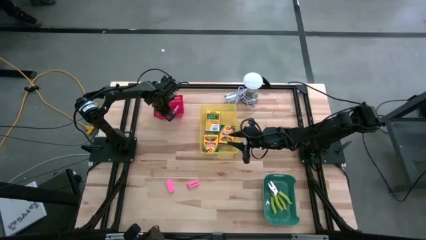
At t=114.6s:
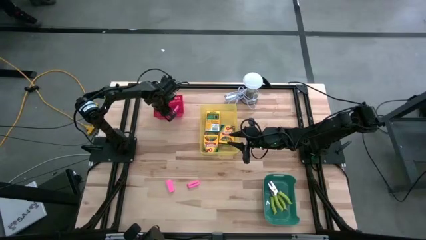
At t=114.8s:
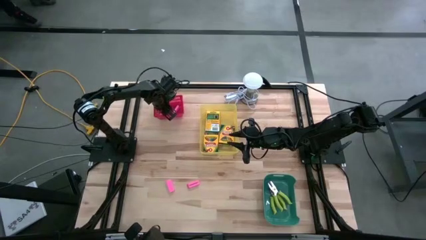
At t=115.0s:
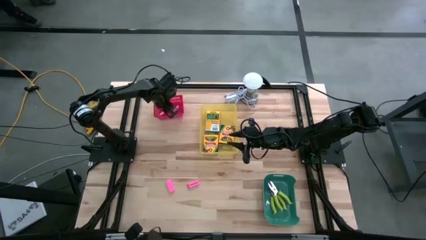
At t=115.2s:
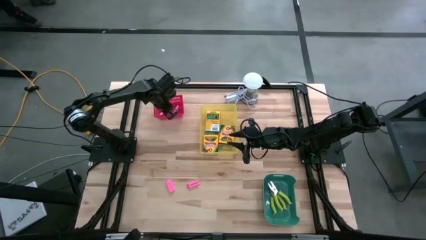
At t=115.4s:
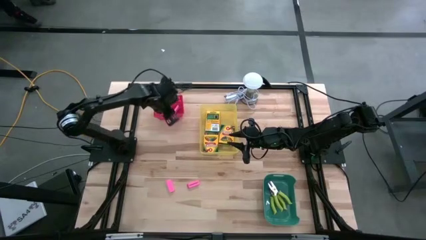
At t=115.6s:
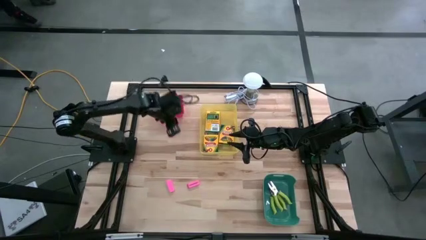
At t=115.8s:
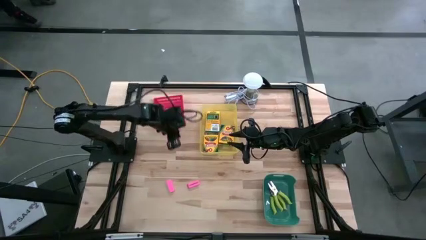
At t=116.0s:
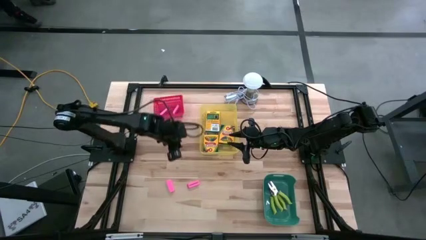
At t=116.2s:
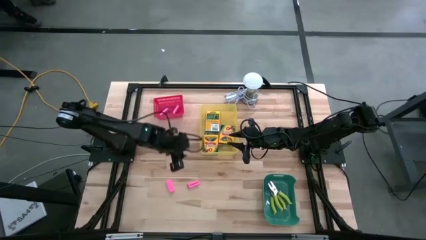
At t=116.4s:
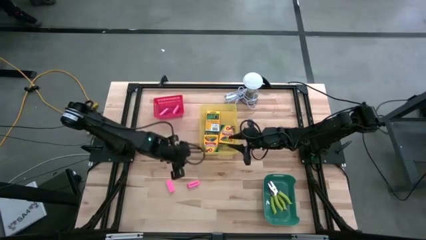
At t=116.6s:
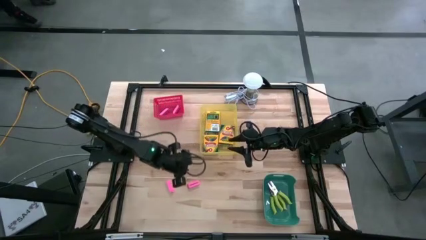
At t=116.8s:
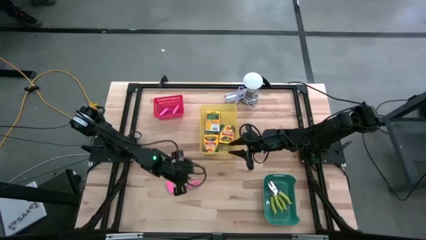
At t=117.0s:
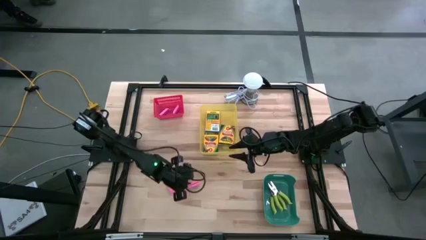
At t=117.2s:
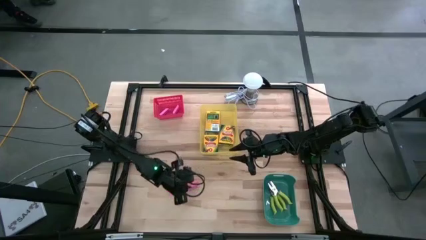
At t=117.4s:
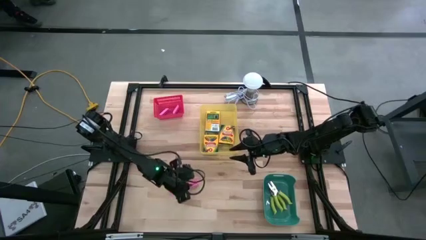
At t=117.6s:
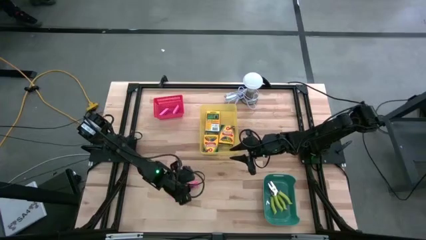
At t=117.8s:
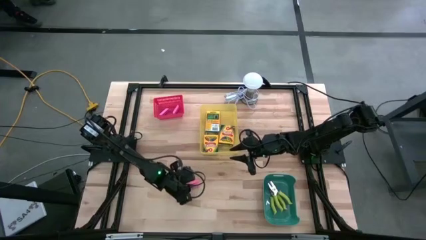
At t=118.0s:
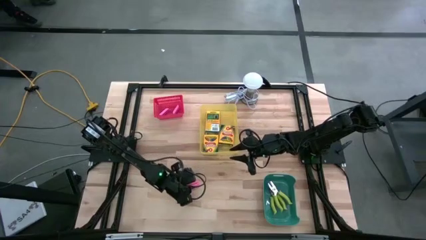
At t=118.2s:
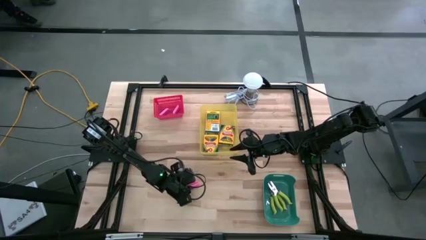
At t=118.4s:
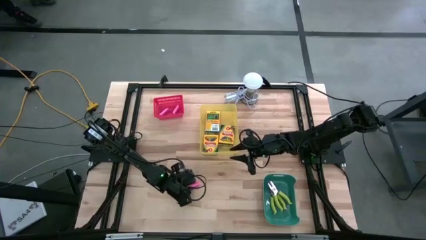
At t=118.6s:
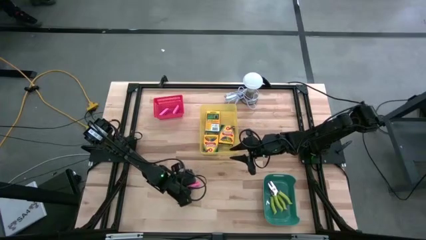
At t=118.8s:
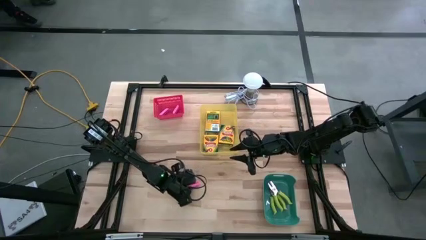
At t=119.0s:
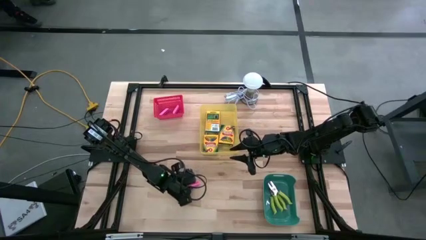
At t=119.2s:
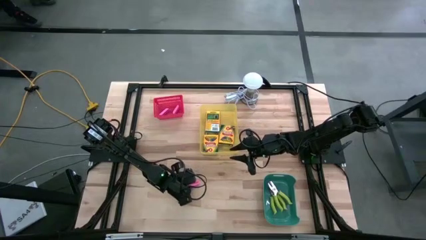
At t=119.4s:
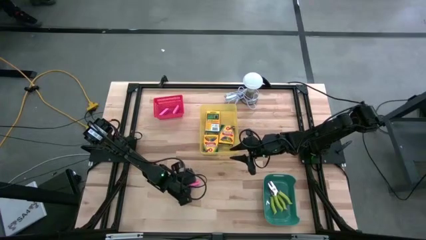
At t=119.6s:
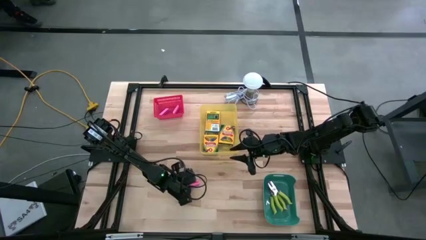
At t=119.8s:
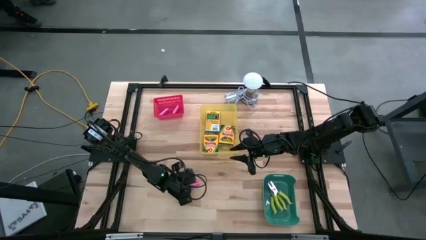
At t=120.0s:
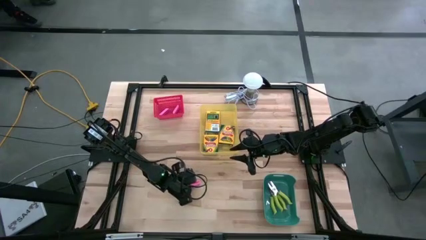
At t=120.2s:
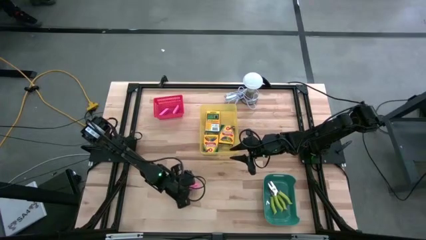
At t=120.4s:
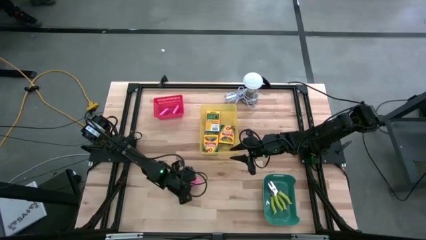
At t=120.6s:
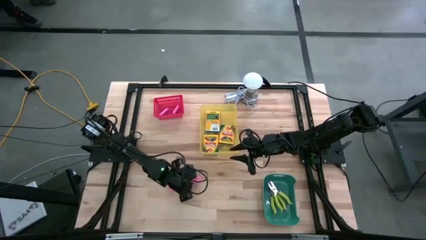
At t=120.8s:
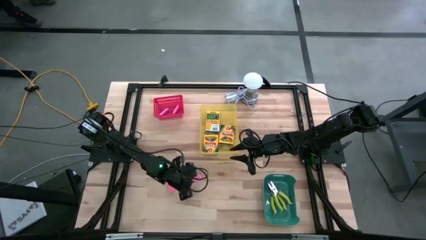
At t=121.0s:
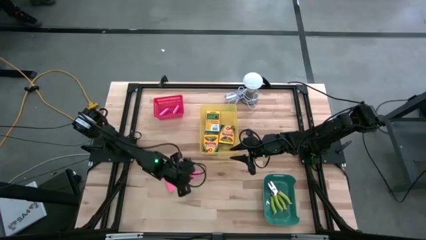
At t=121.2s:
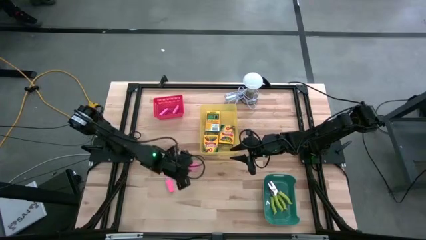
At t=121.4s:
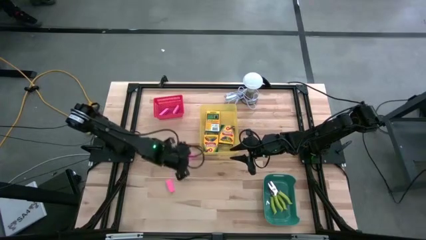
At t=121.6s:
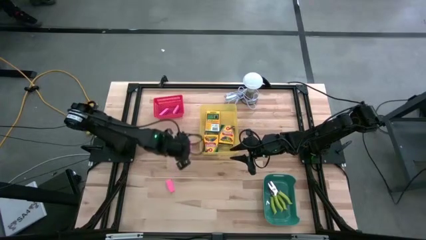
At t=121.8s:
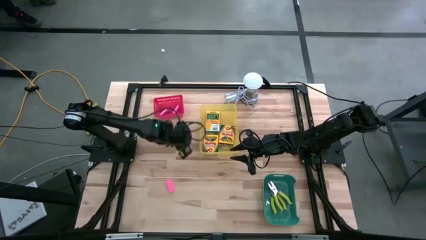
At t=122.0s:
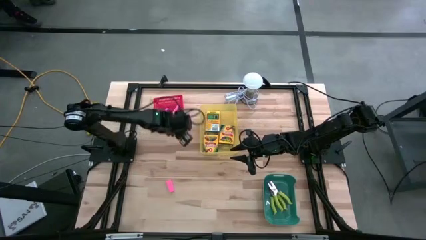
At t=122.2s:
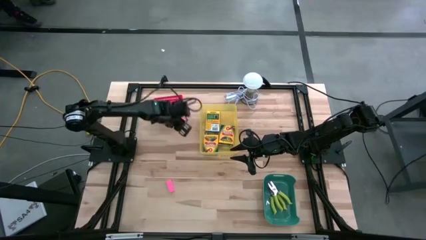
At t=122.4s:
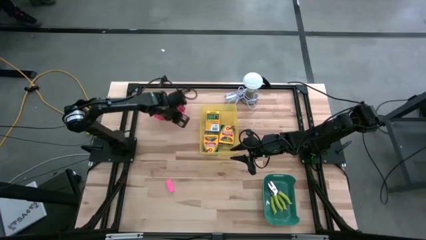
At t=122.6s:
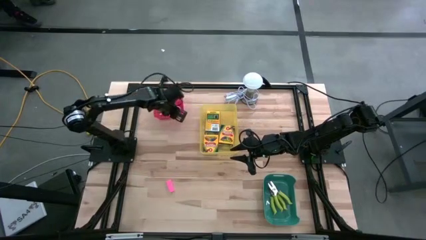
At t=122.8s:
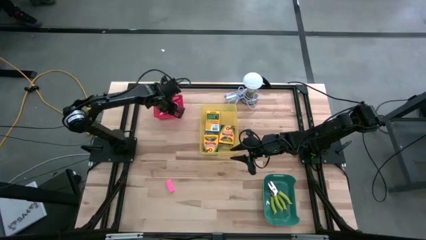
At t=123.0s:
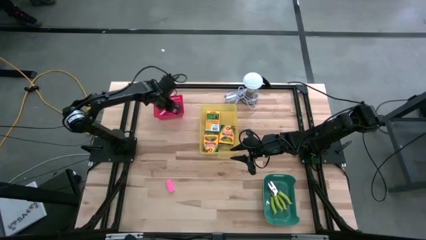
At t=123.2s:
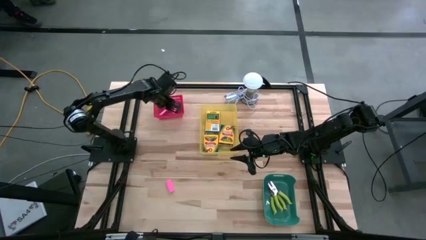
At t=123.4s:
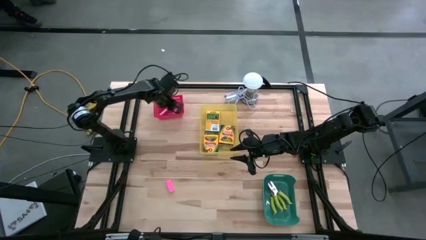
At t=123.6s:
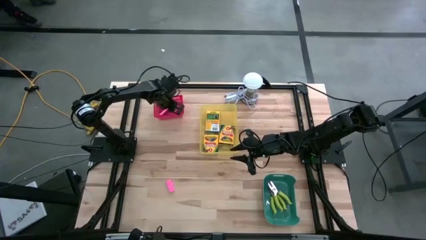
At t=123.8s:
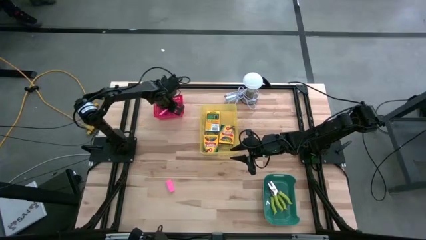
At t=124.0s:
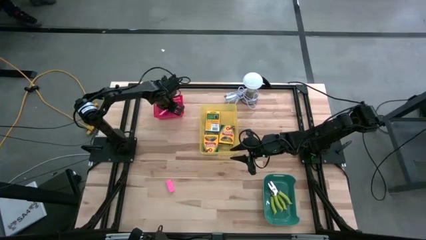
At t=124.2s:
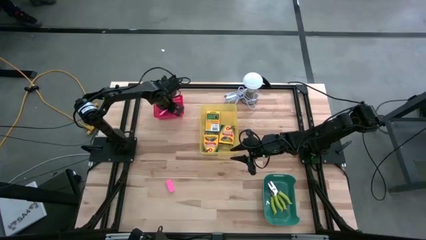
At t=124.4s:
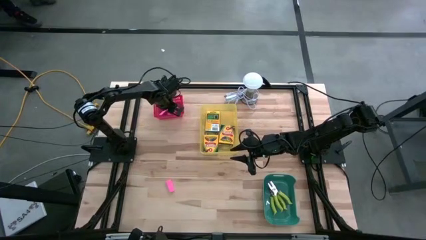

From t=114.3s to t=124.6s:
Task: Pick & Place School Supplies
Put the pink eraser into the red bin

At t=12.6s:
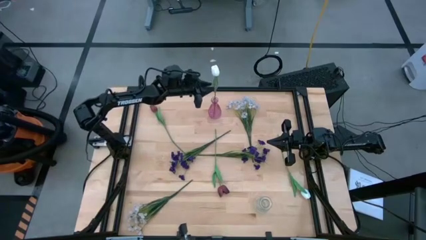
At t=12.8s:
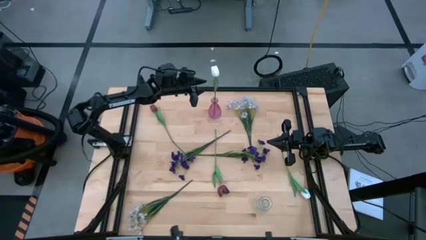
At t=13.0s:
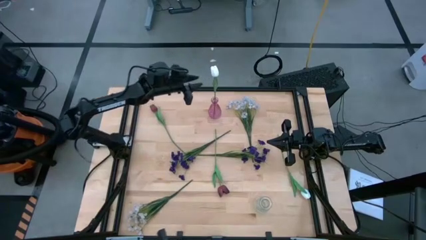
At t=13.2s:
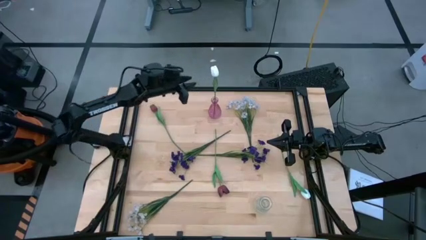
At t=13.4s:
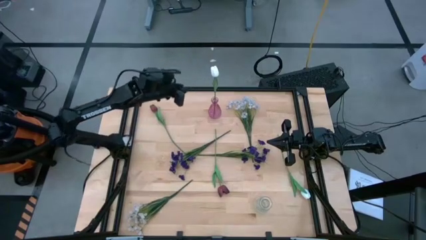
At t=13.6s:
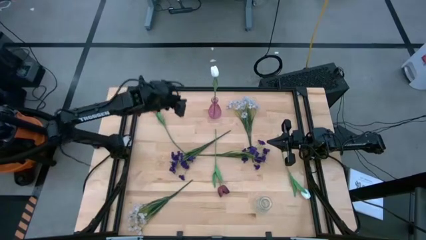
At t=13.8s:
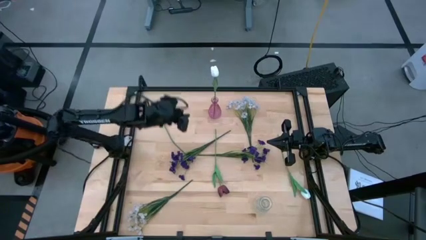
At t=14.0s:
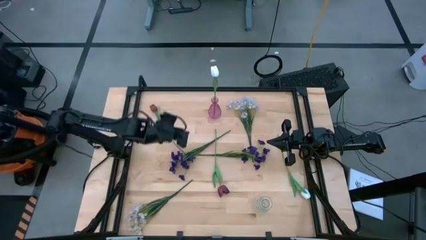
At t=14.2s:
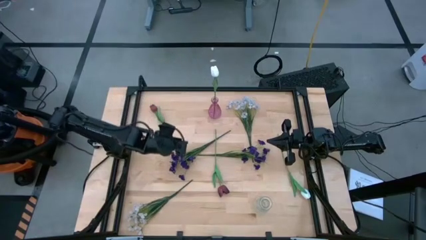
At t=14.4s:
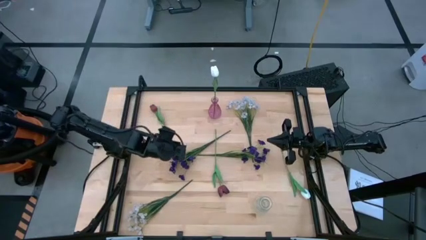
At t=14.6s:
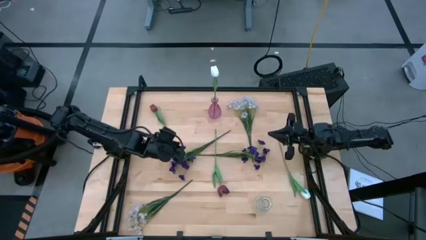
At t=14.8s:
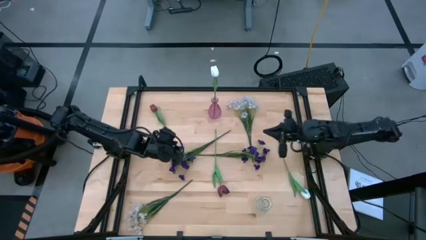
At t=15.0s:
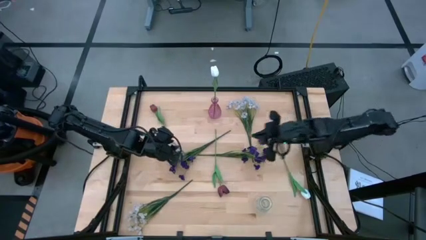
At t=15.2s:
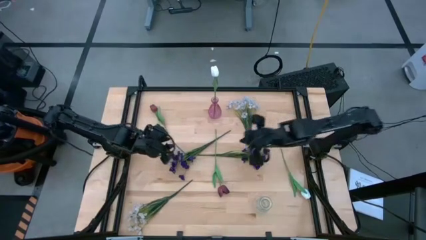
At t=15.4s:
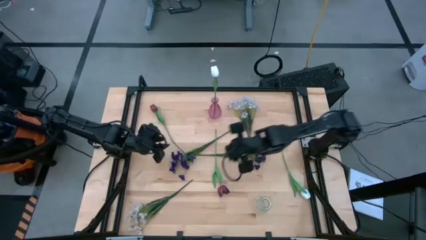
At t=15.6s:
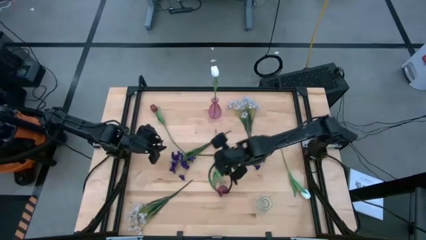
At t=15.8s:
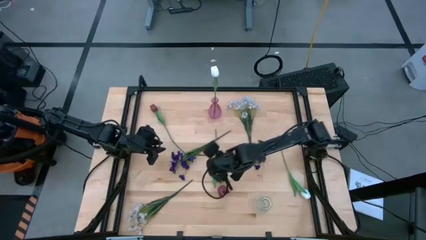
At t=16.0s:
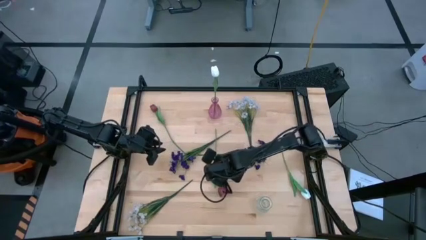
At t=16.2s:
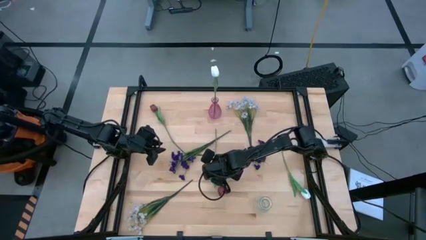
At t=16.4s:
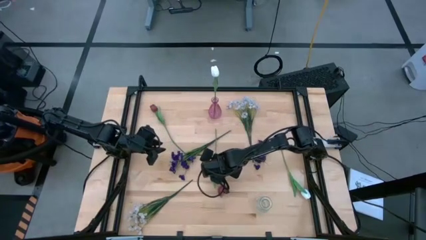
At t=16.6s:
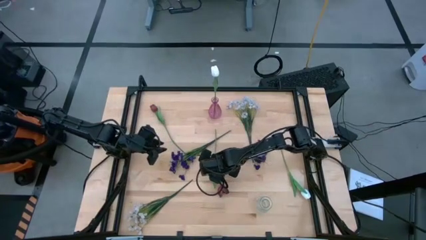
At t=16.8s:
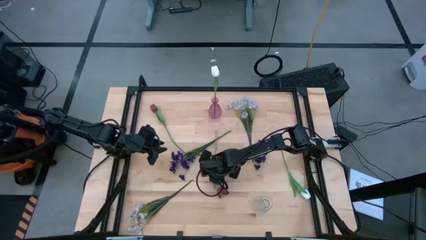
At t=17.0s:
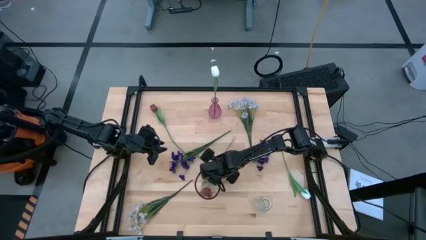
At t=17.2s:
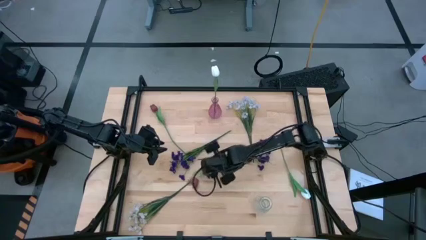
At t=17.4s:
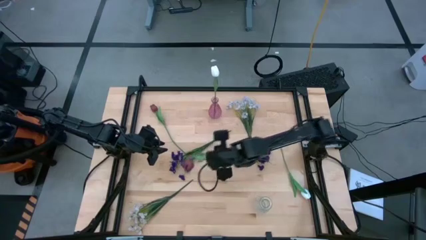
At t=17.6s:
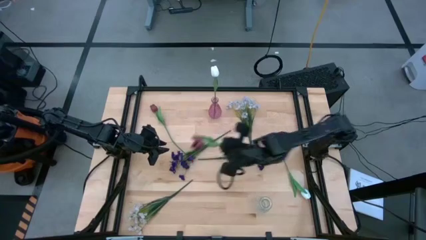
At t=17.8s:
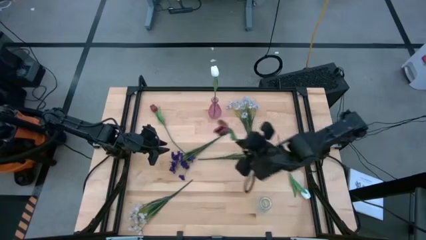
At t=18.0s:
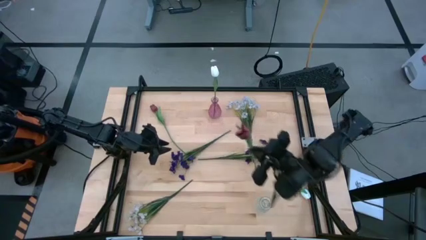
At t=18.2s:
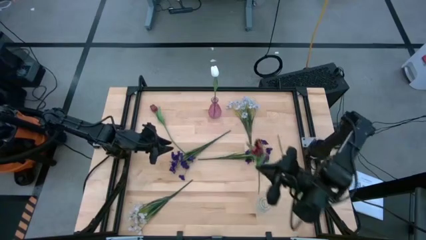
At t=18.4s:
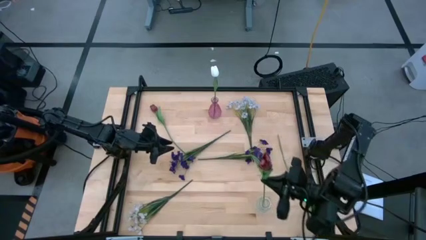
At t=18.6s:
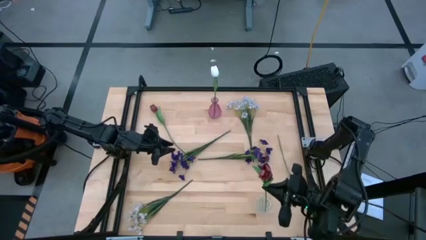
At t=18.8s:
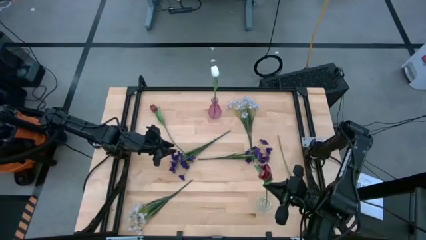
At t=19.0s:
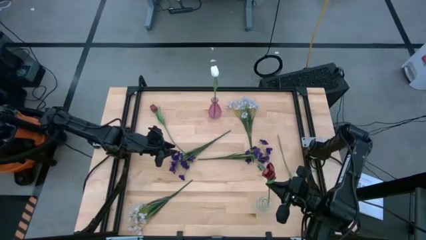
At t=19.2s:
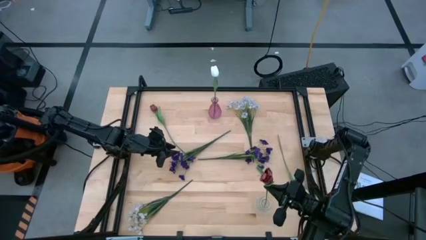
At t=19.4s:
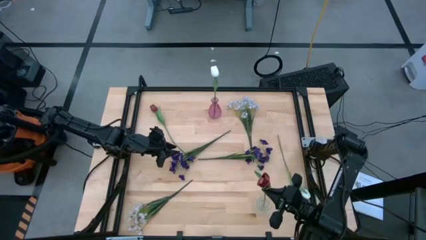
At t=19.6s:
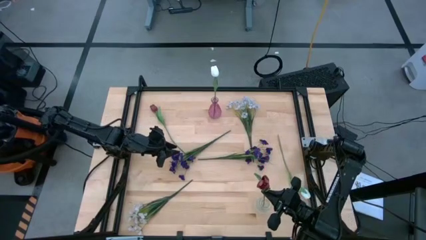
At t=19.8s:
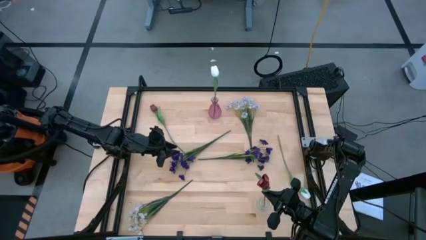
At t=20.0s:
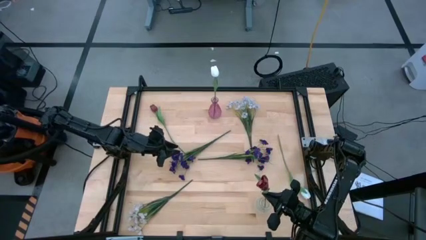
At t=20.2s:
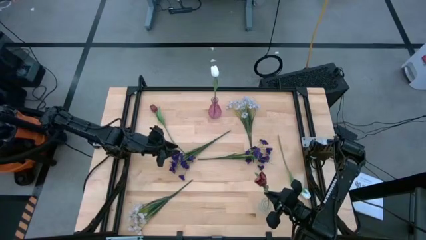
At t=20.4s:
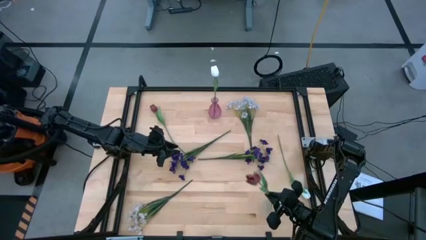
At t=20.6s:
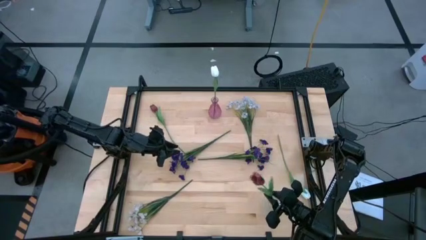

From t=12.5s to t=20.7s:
Task: Sort flowers into vase by color
Put the right red tulip into the transparent vase
